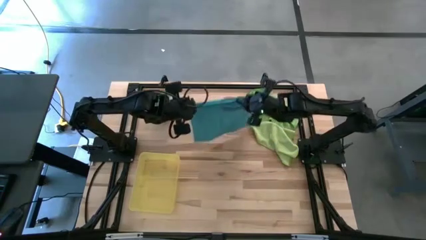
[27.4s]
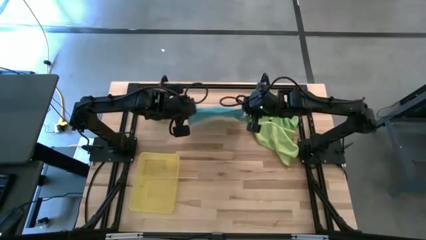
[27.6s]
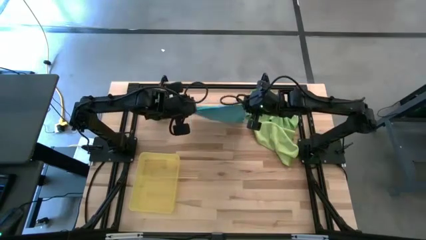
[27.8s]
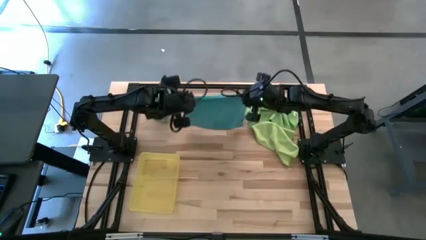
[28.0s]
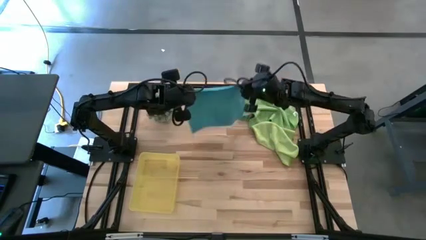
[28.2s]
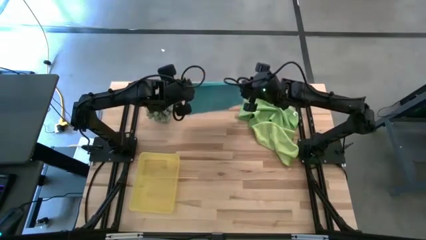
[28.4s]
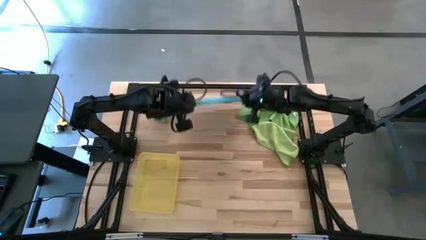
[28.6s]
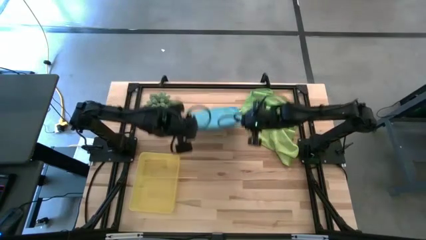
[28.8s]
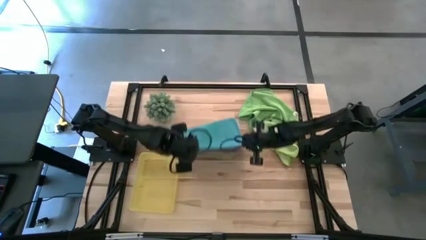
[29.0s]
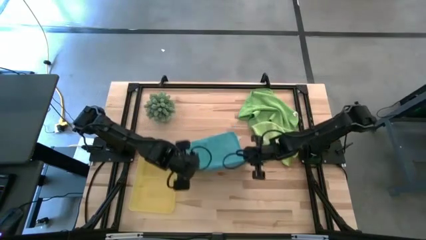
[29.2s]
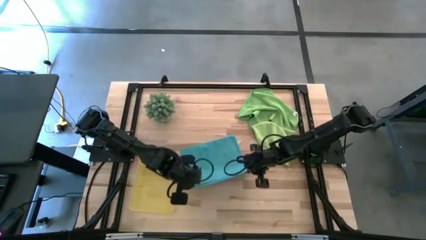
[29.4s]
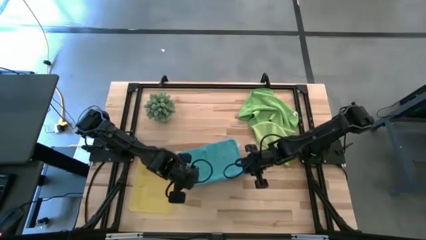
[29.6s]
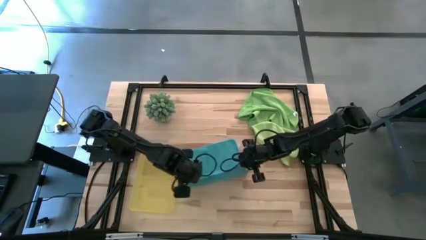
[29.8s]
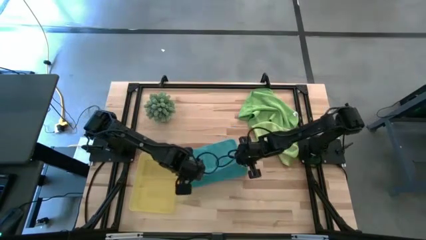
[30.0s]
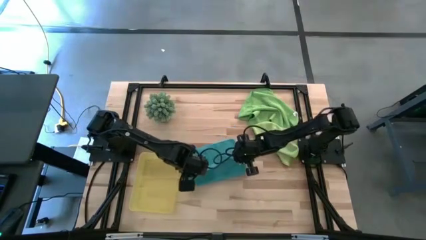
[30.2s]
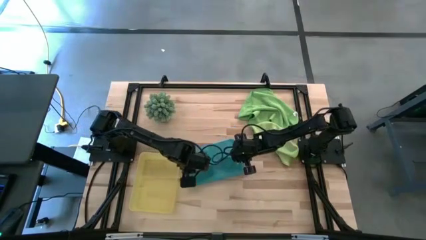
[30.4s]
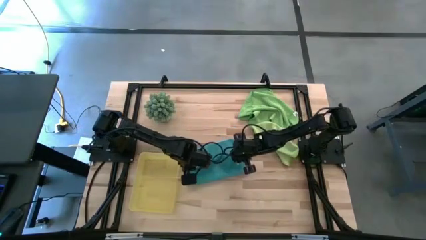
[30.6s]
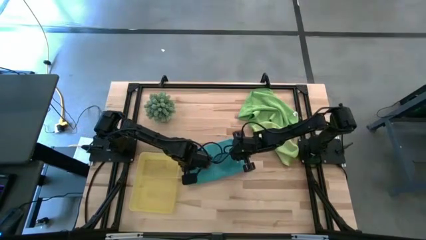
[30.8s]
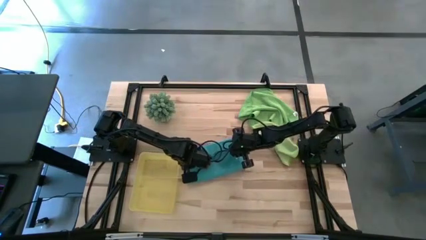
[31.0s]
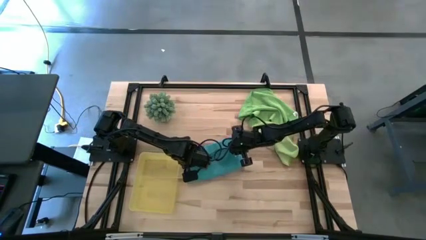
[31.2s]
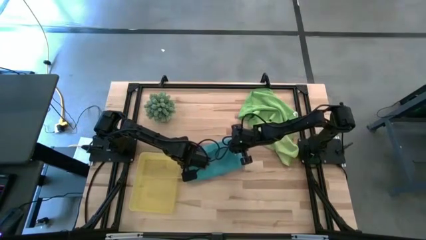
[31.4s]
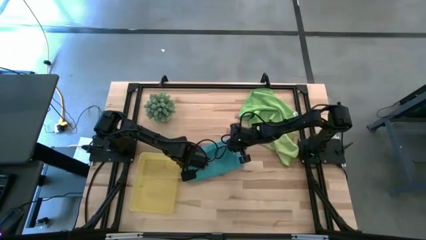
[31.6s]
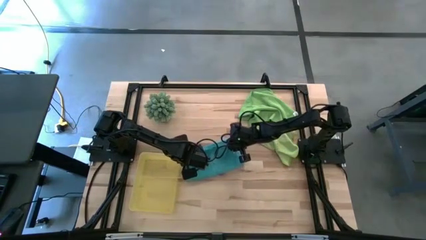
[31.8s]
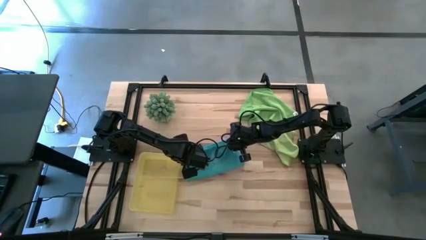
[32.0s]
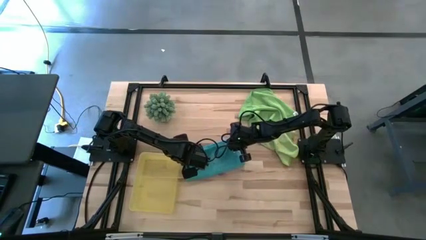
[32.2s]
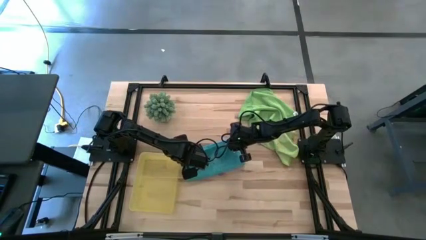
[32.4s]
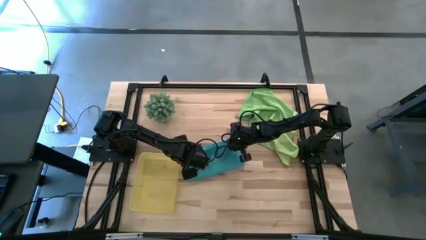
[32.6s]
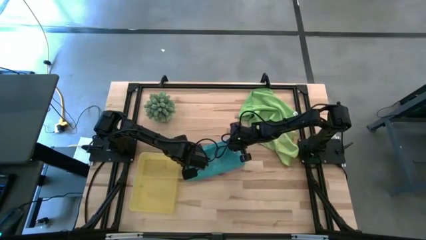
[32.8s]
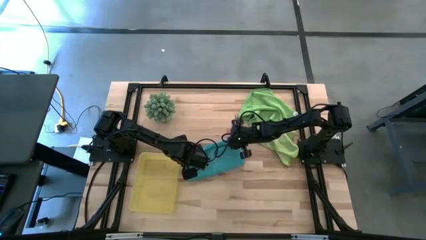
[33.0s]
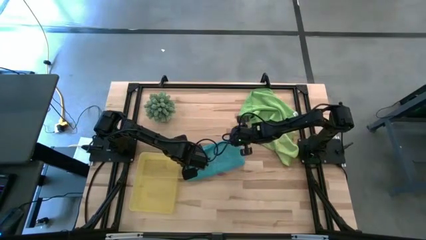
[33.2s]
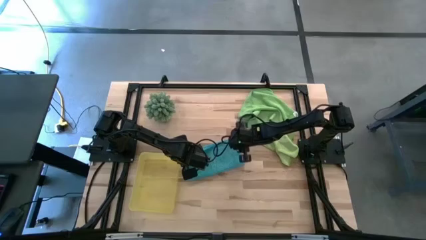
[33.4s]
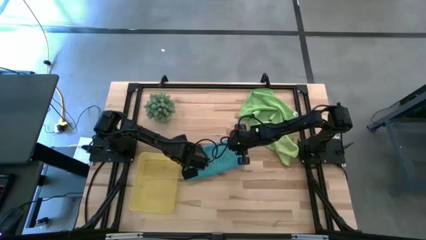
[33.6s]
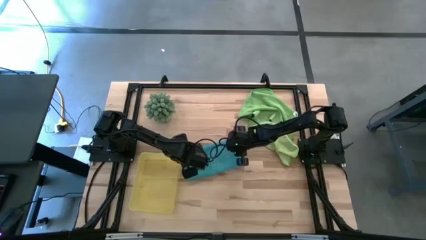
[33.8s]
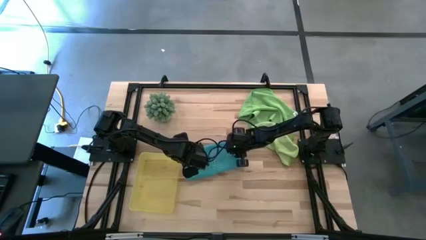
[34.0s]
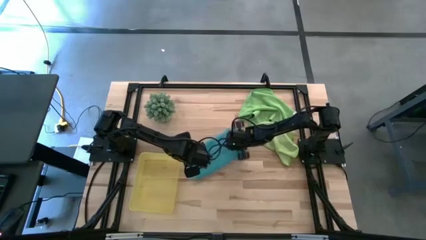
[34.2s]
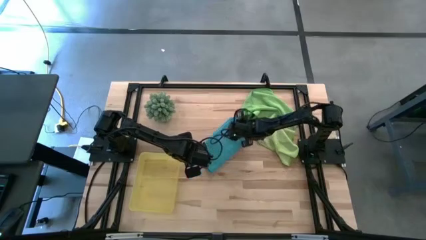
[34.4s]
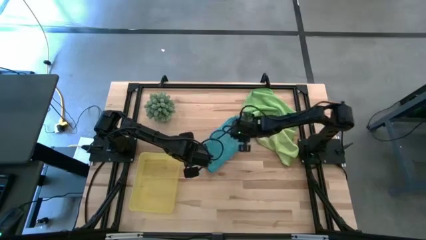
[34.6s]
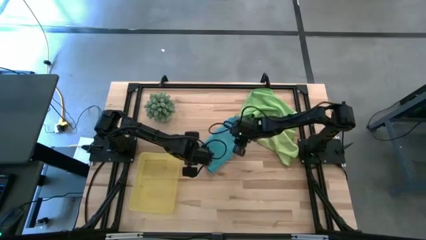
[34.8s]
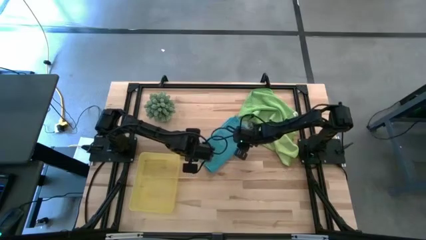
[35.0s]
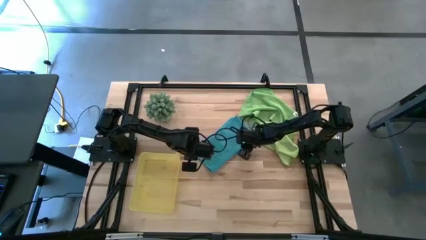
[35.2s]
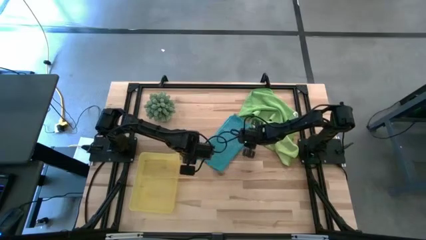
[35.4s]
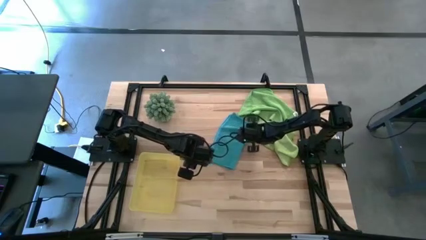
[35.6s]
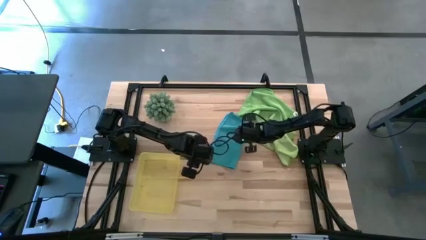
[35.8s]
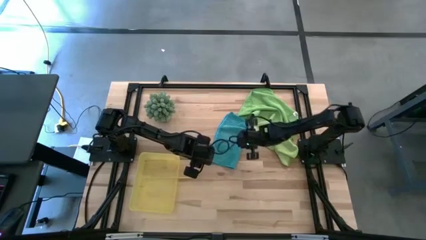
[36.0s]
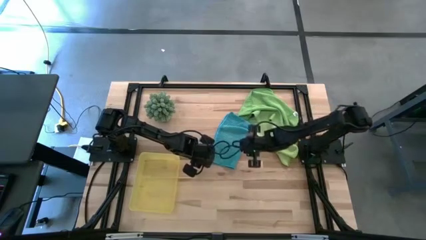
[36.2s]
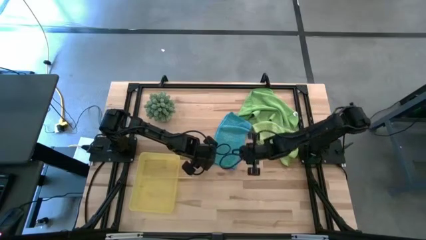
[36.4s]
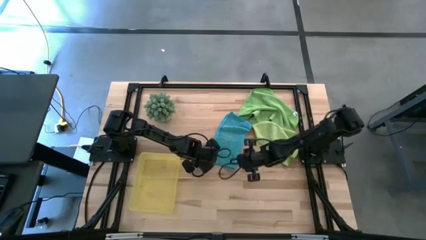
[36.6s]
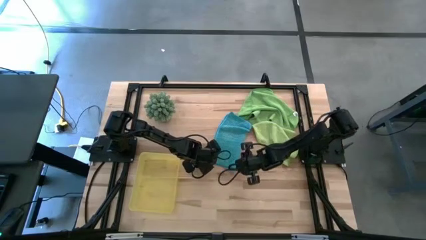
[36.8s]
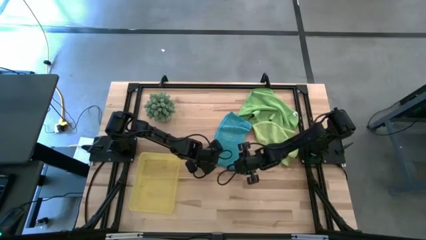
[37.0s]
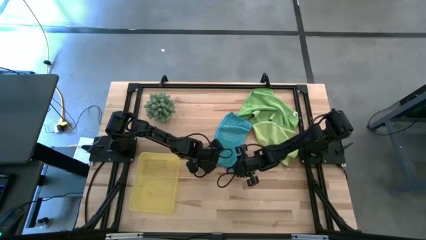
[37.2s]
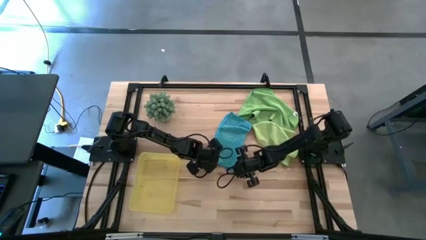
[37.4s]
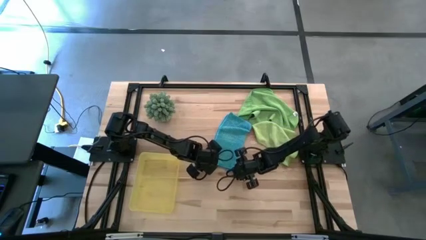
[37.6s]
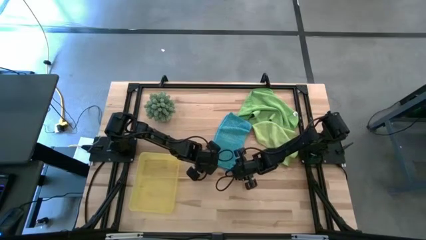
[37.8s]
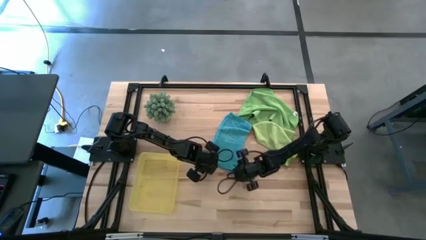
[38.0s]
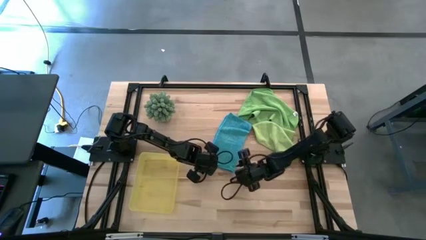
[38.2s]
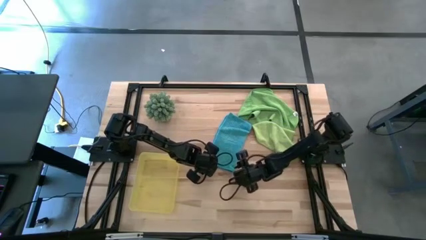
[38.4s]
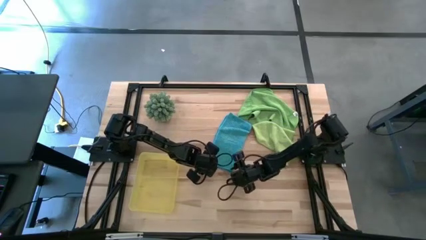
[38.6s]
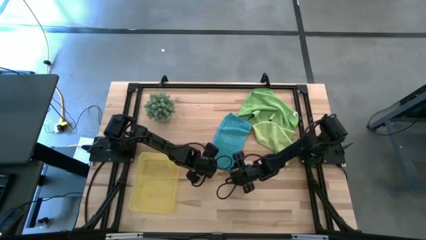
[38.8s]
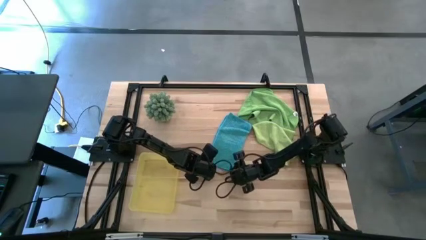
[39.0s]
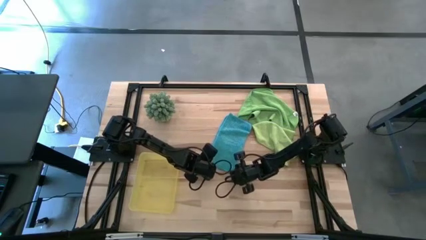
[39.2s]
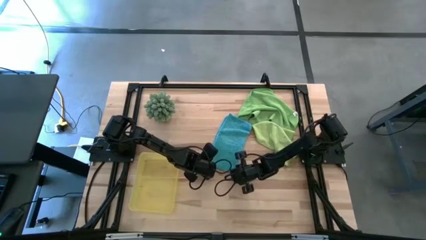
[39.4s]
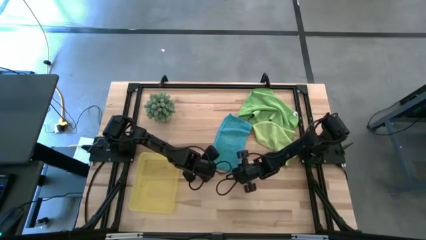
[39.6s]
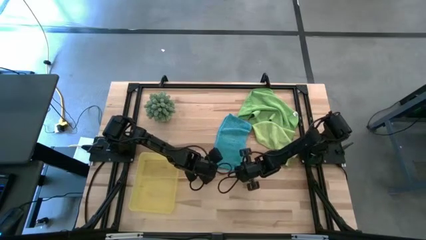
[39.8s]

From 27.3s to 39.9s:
Task: Roll microfiber towels into tight, uniform cylinder then place into a basket
Fold the blue towel

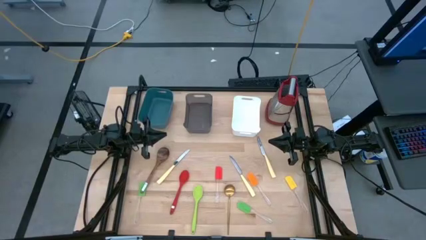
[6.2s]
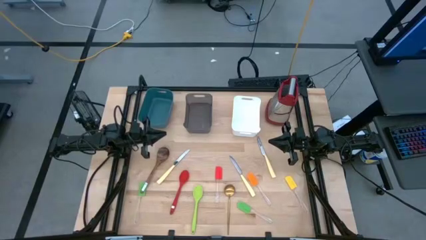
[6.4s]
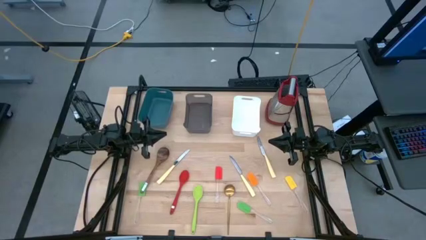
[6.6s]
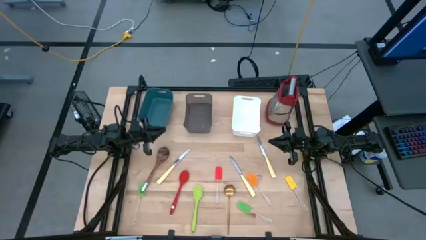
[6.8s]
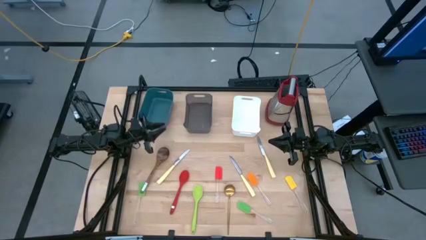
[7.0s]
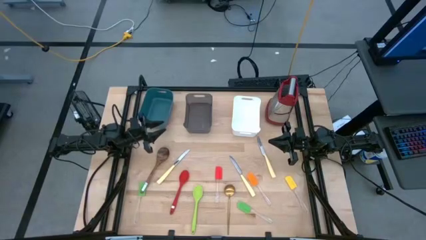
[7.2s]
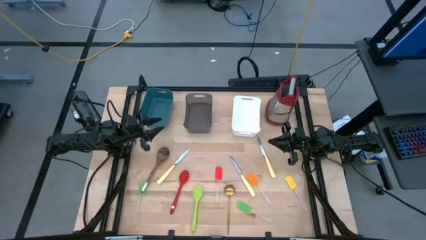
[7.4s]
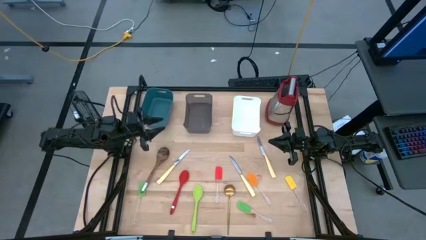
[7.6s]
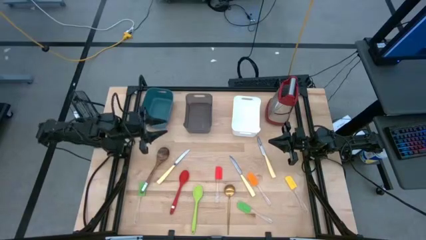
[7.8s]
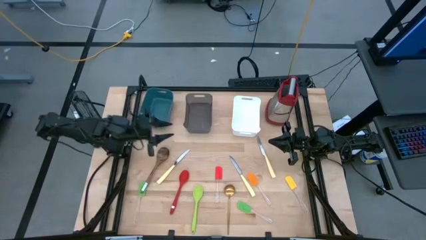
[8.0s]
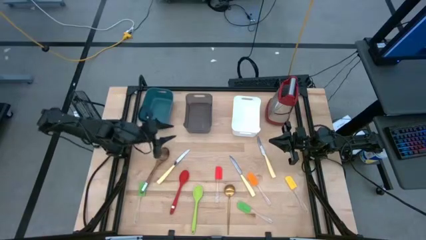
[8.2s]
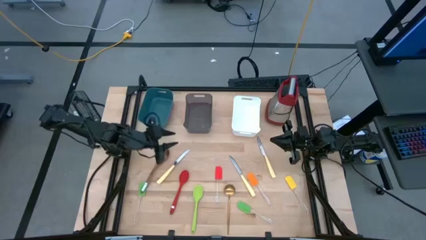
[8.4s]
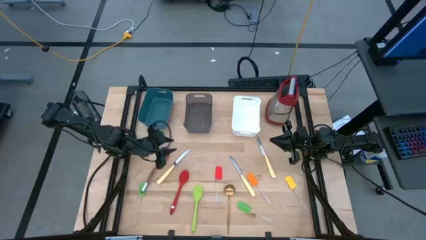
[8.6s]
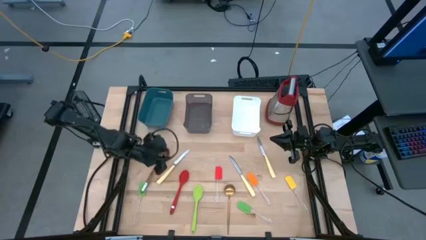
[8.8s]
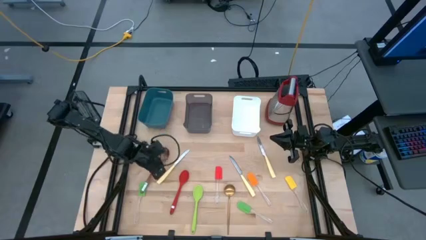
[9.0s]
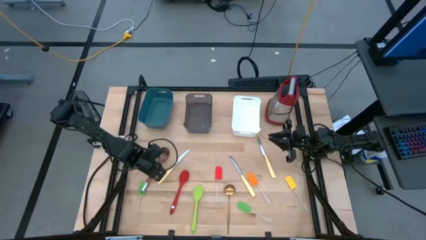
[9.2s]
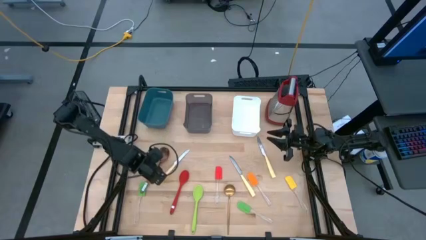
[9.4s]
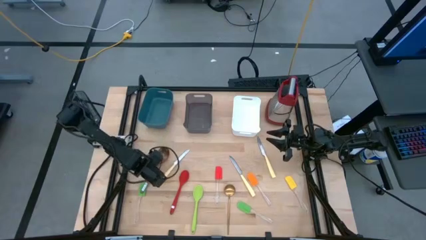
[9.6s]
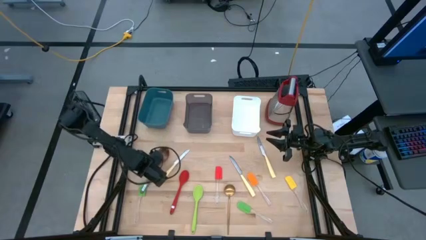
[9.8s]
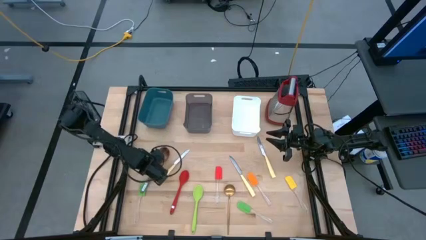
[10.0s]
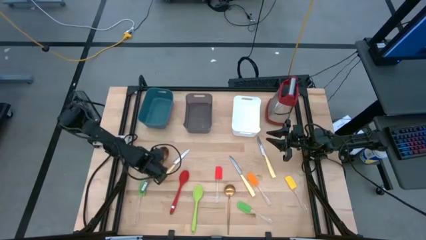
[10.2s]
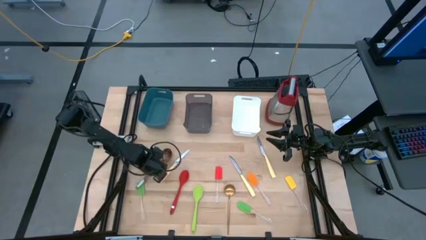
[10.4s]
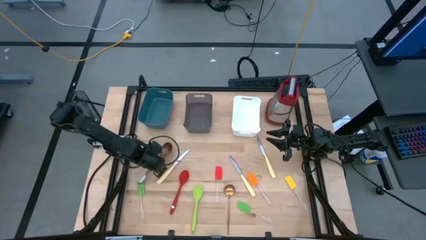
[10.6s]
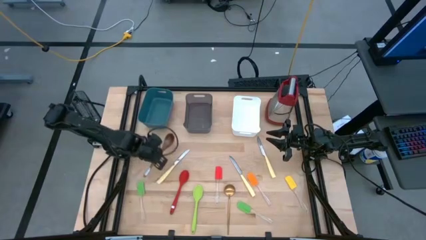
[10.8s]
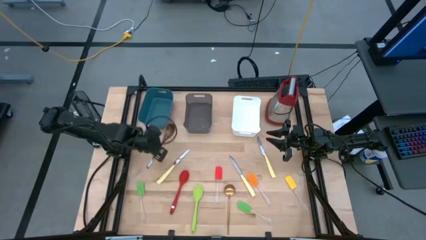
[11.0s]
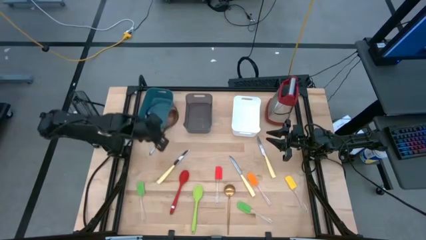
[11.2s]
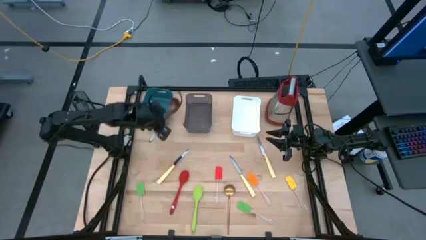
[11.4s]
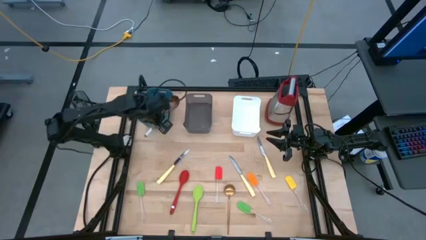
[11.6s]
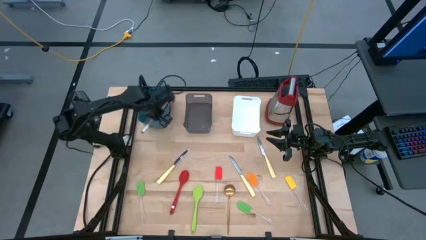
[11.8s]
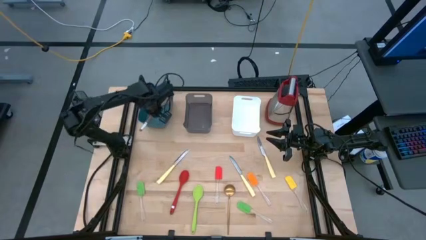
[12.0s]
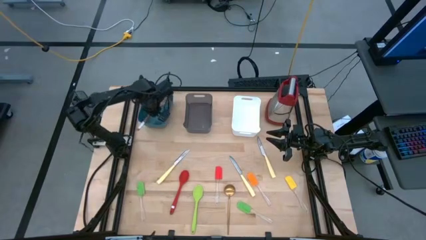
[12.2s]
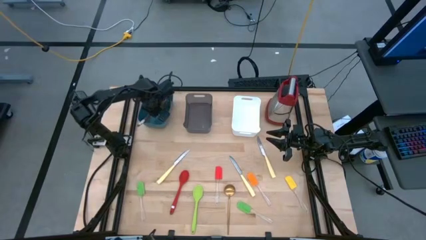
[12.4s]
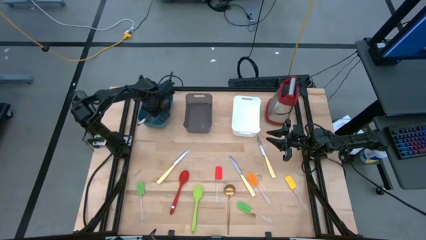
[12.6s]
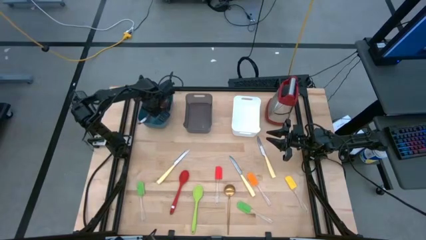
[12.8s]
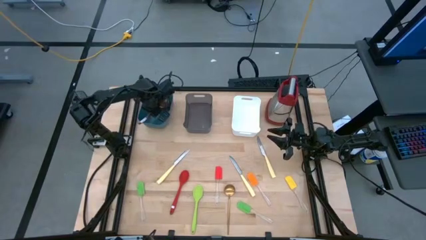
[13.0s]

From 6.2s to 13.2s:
Task: Pick & Place Kitchen Items
Put the brown serving spoon into the blue bin
